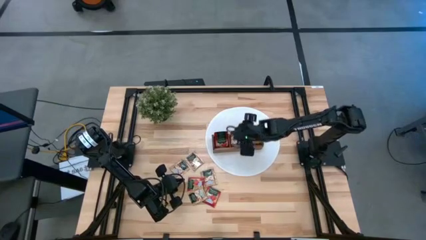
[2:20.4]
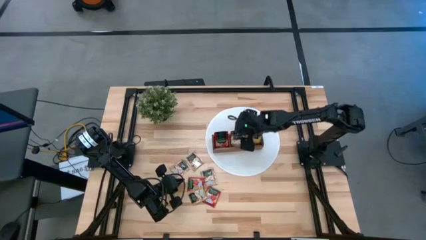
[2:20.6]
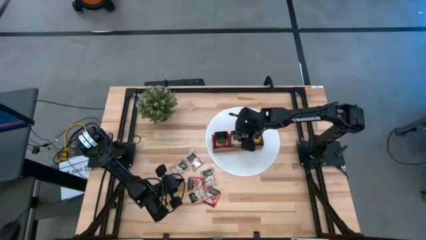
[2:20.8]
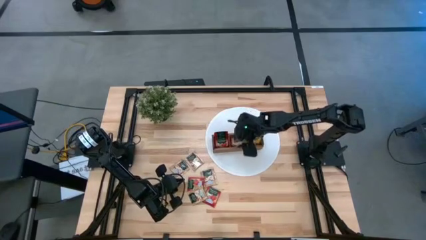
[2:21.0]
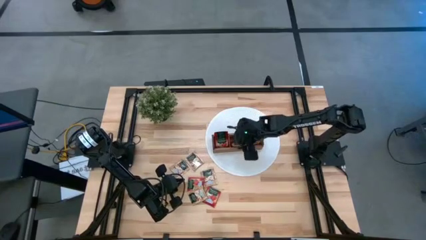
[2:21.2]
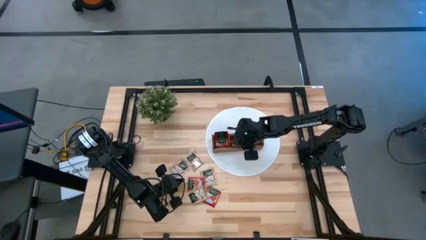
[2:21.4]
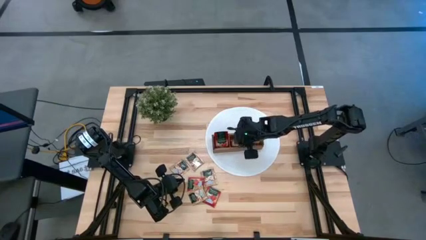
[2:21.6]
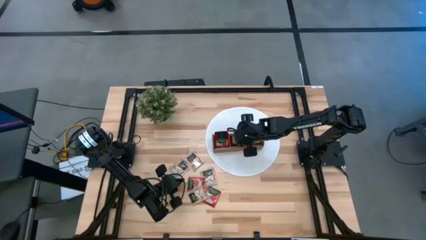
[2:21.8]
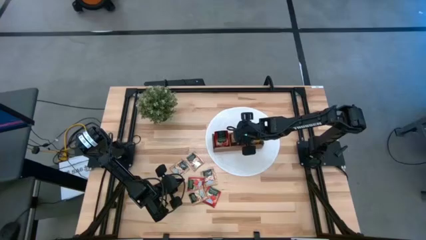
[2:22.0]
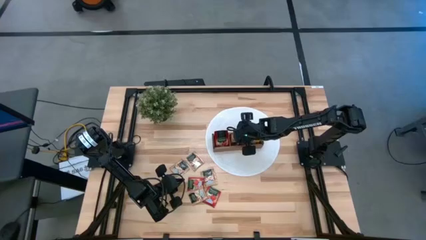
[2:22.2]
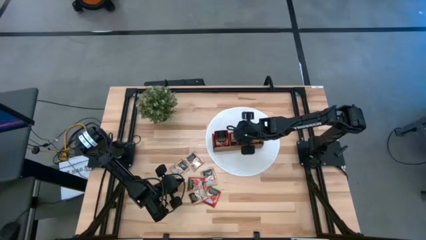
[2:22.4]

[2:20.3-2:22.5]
Task: Pick & Place Tea
Adjust the brown tea bags in the wooden organizer

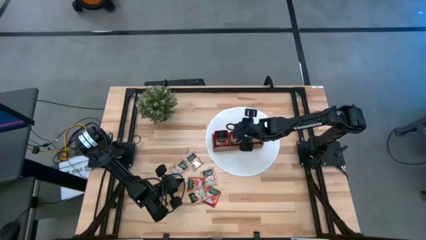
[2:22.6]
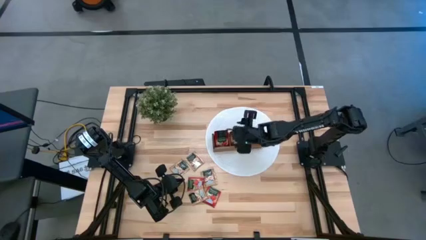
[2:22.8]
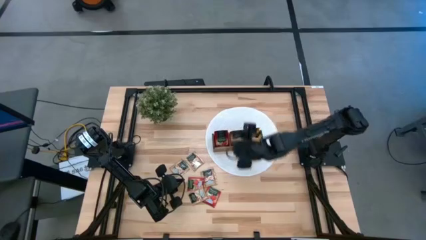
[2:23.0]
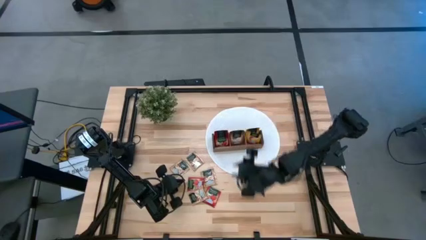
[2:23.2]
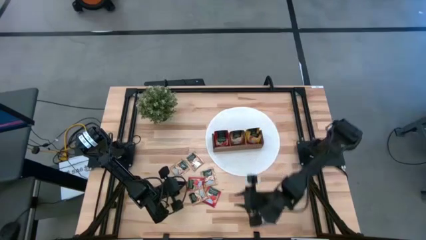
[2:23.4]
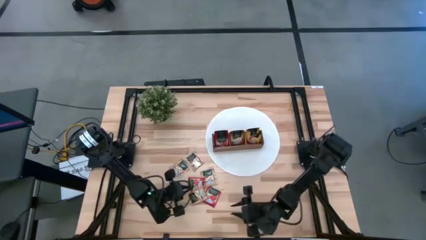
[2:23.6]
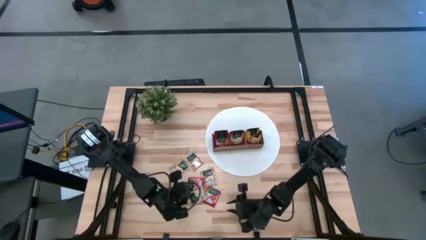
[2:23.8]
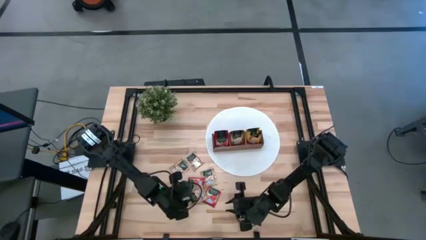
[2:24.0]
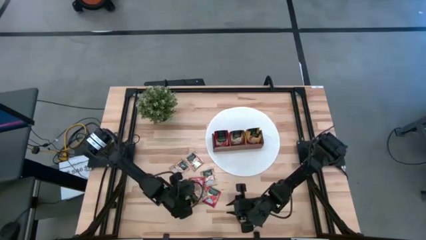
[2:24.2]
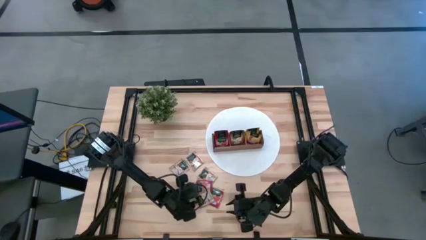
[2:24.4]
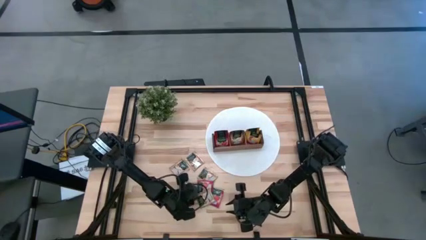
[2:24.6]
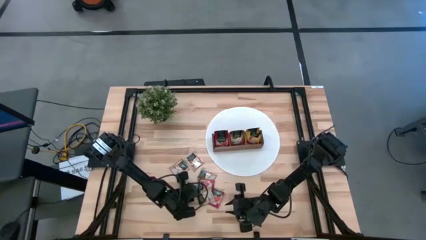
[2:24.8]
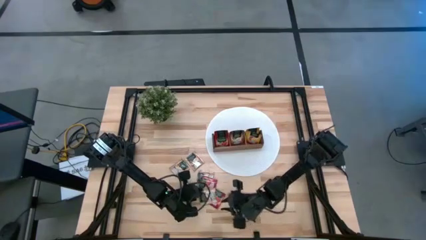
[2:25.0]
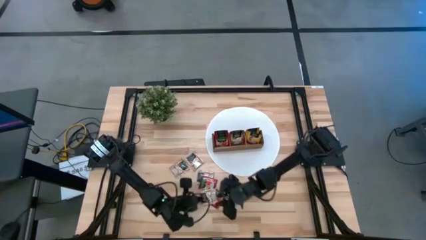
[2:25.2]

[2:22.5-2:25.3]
Put the brown tea bag into the middle section of the wooden organizer

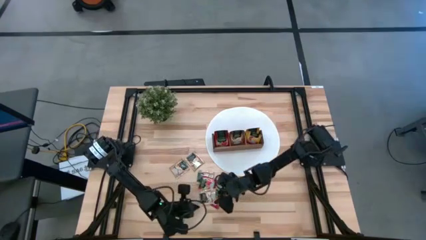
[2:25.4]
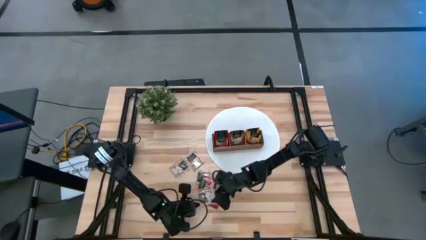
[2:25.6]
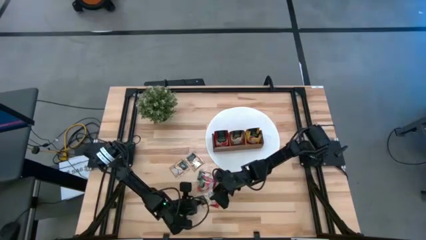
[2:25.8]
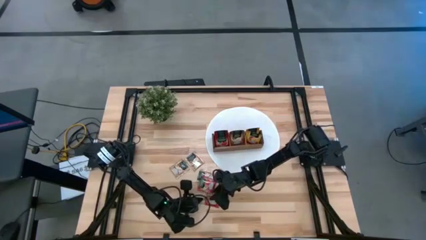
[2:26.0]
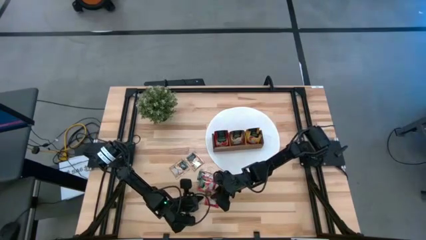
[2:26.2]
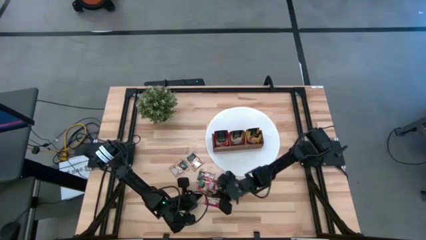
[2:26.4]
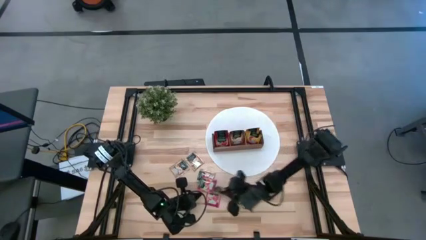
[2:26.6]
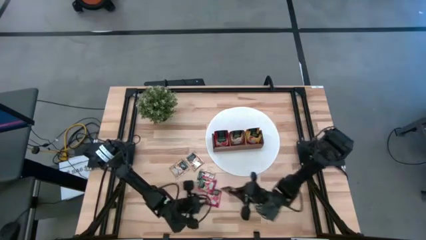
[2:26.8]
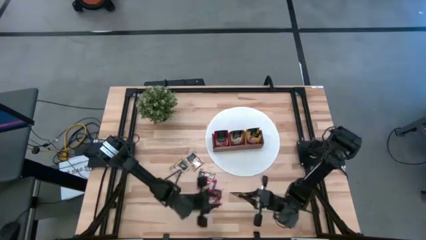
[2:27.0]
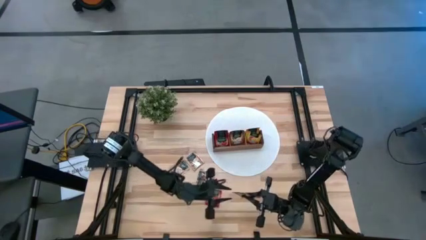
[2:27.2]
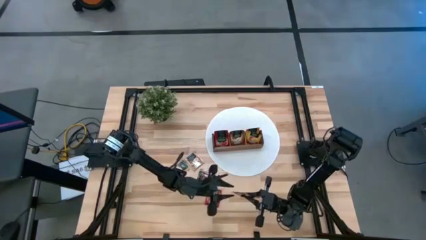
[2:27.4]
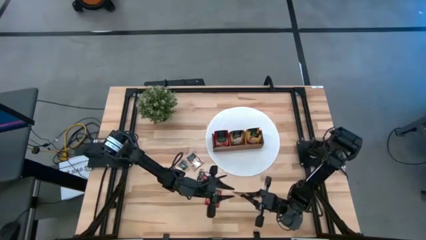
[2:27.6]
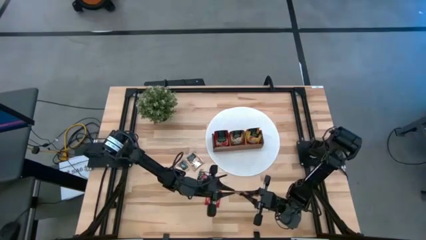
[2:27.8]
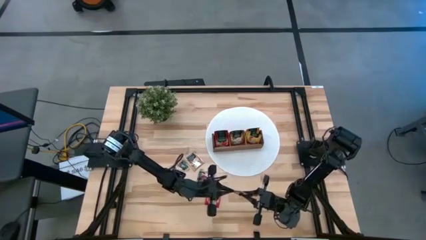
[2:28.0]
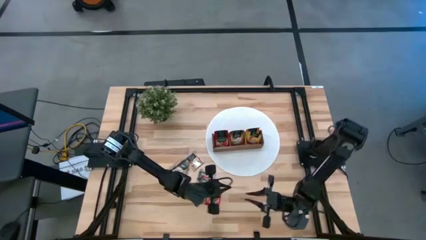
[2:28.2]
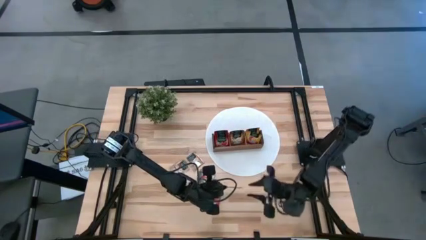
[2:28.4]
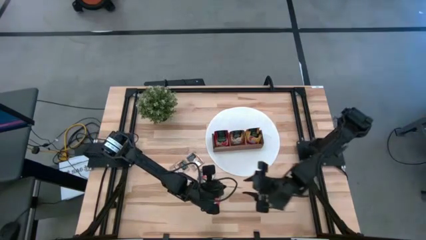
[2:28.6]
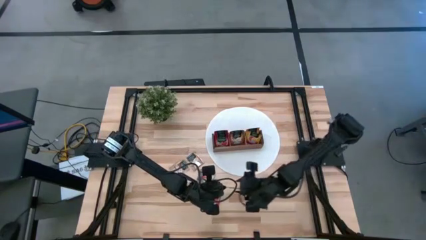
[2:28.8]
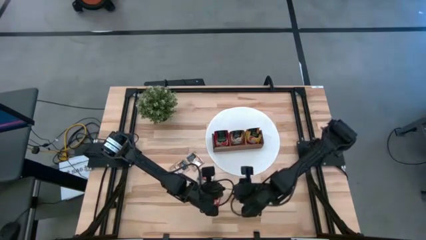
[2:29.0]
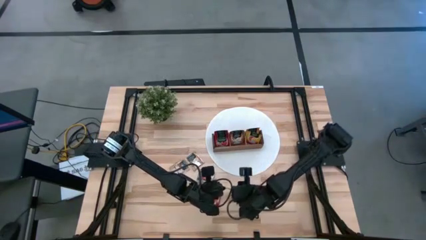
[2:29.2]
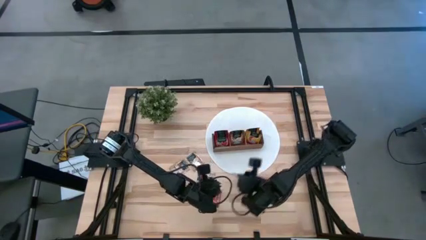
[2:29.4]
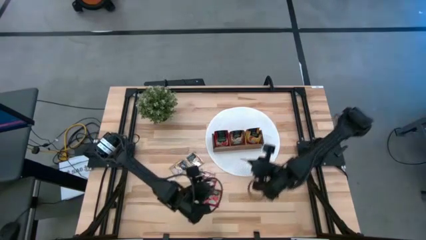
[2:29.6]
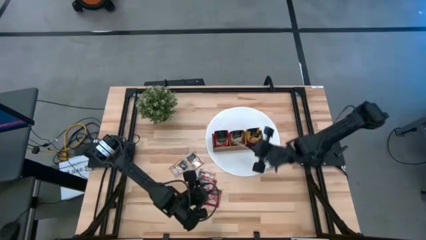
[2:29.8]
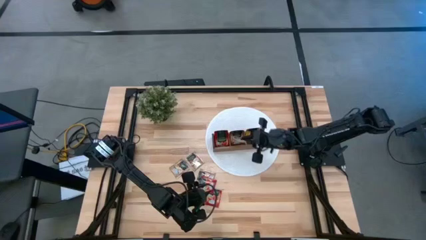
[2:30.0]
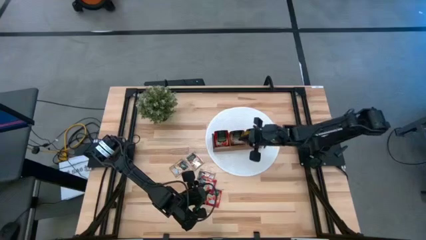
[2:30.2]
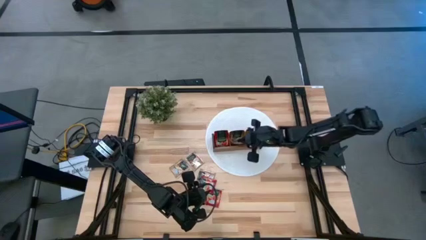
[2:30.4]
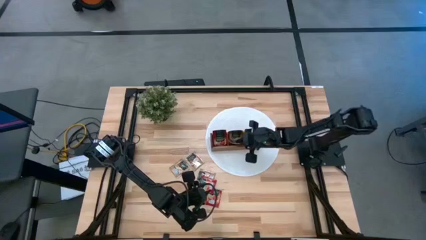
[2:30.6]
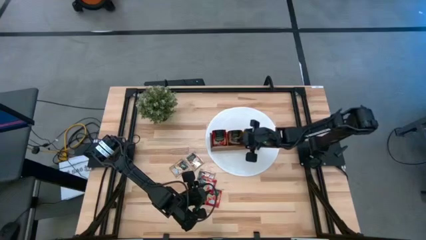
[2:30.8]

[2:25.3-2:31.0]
Put the brown tea bag into the middle section of the wooden organizer

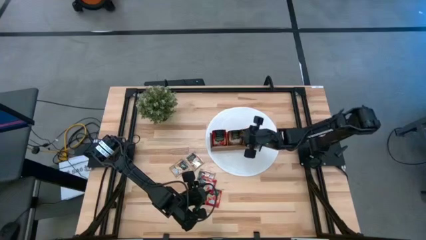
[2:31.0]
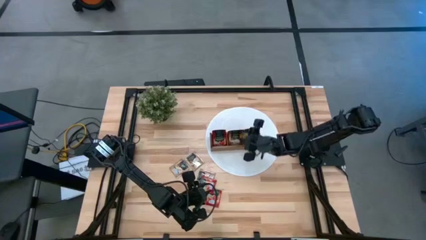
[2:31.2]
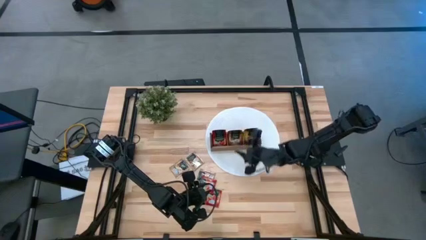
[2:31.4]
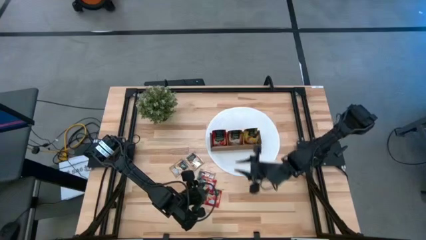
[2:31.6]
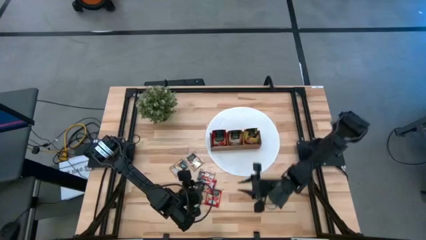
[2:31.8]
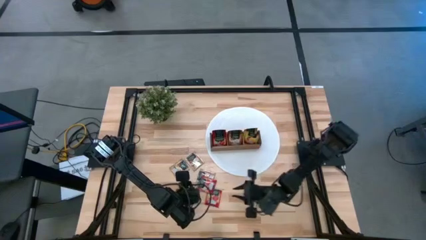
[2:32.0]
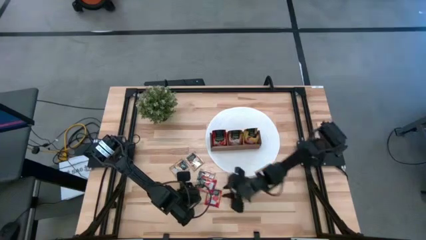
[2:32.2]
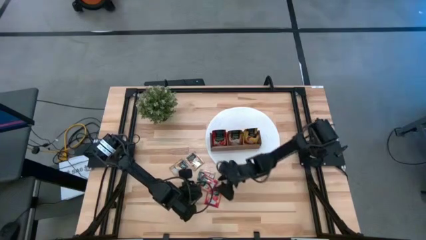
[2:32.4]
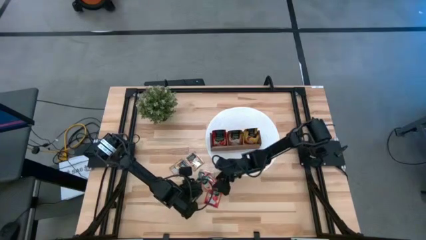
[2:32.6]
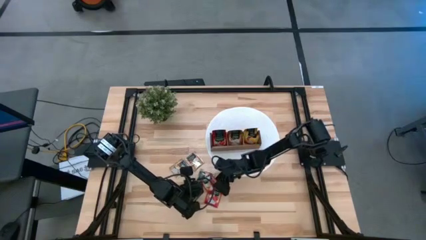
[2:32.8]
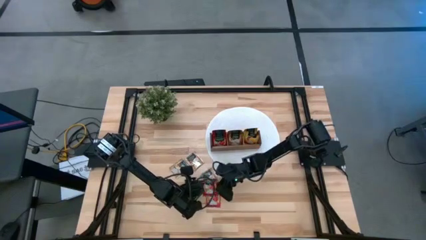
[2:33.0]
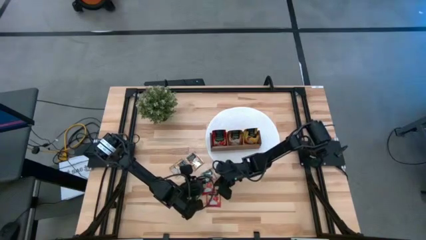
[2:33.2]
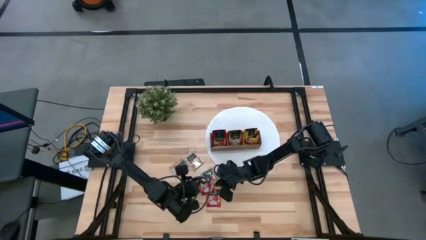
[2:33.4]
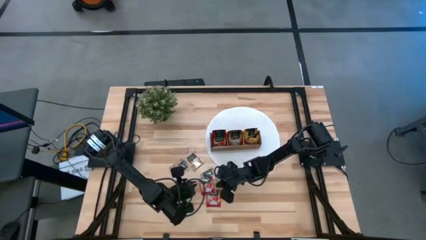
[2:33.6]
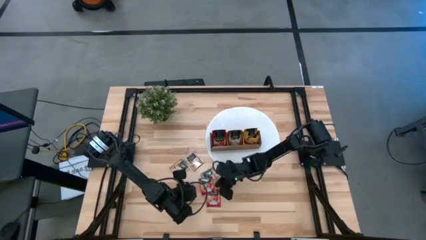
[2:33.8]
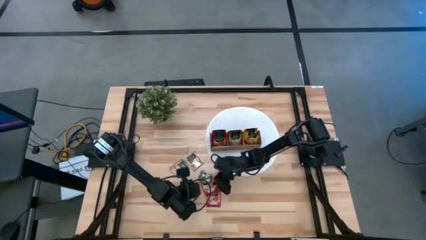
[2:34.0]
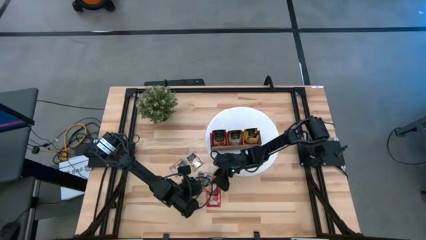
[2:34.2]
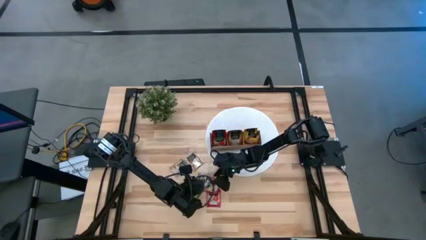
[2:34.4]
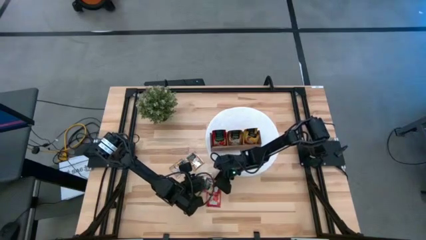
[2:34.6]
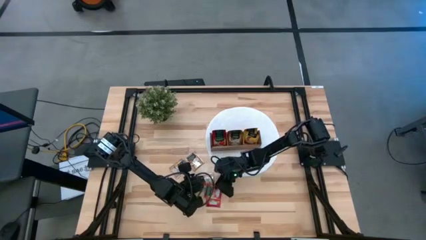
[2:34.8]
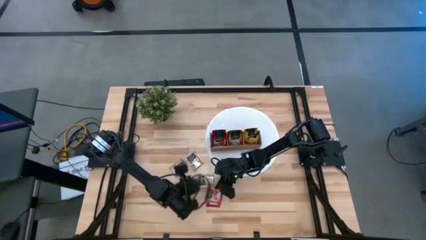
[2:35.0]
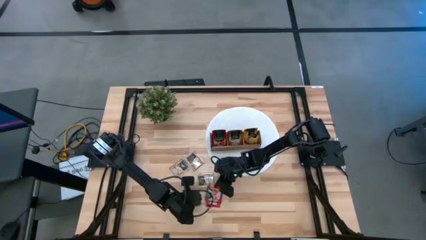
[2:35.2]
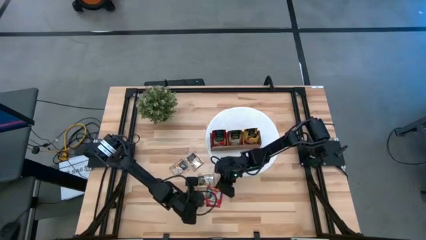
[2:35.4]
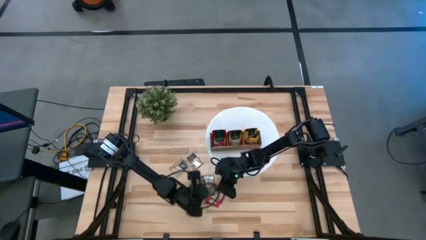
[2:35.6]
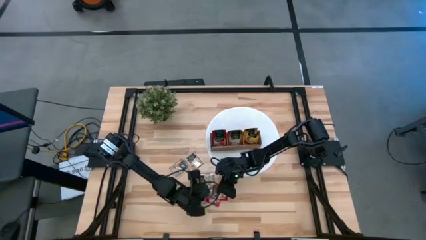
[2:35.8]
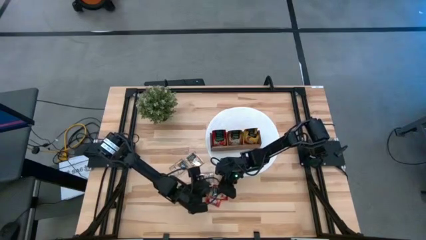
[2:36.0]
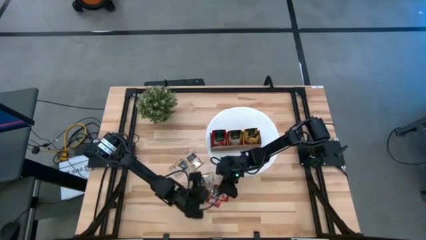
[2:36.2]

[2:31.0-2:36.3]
Put the red tea bag into the left section of the wooden organizer

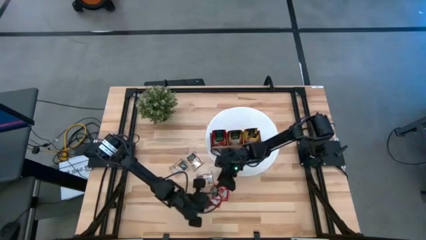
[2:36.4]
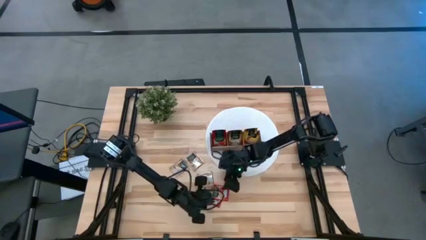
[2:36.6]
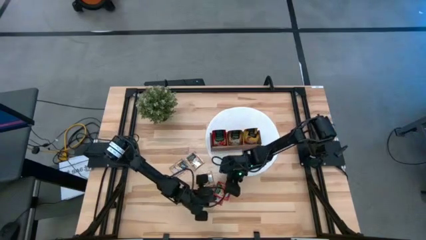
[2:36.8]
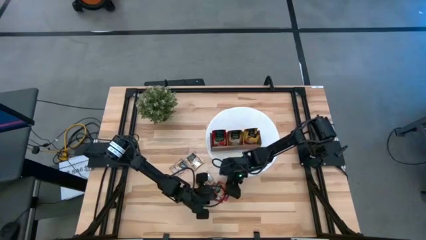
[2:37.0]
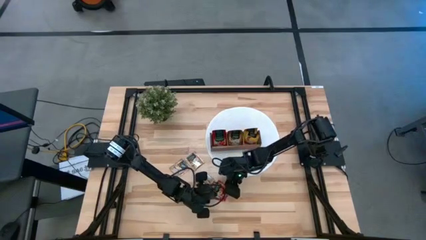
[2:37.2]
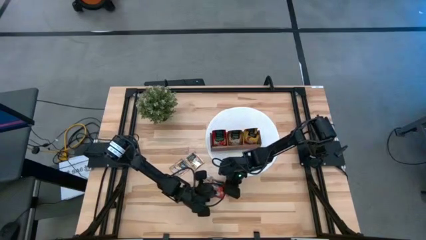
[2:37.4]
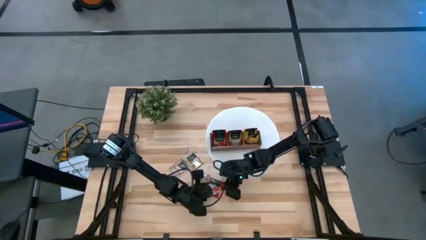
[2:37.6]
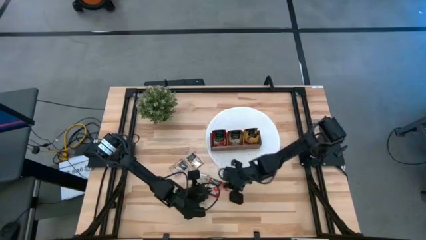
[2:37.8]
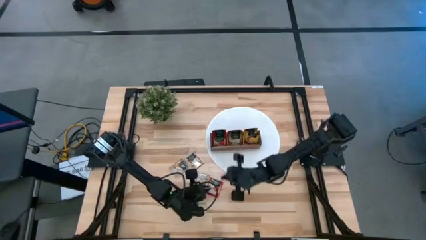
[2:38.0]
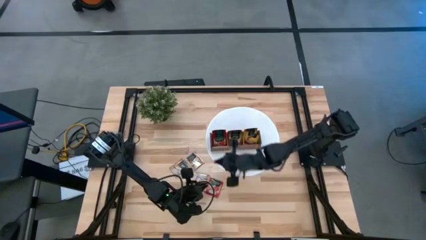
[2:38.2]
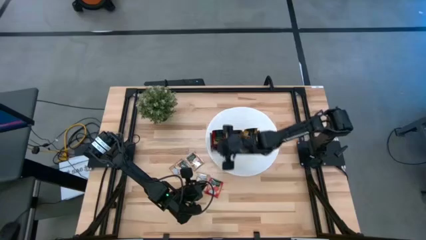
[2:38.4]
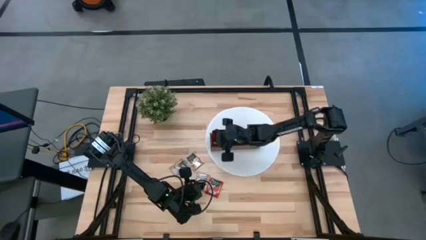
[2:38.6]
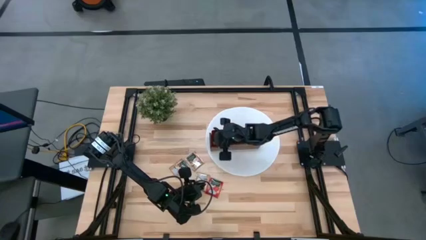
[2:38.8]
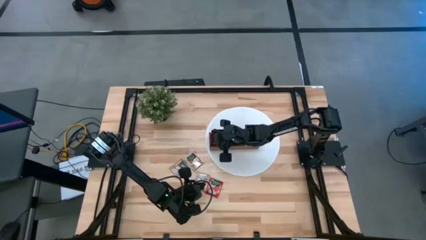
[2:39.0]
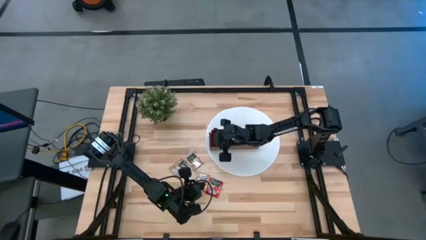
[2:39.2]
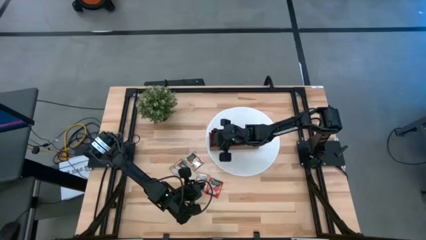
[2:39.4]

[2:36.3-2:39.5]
Put the red tea bag into the left section of the wooden organizer
